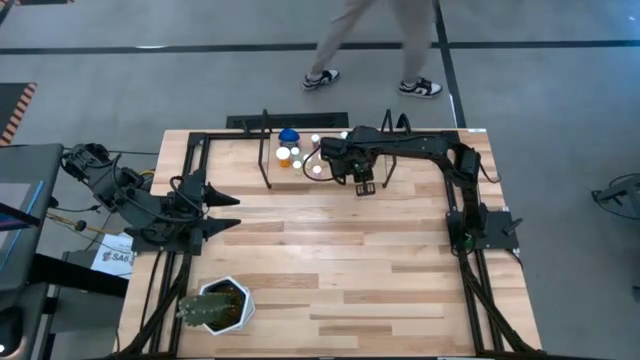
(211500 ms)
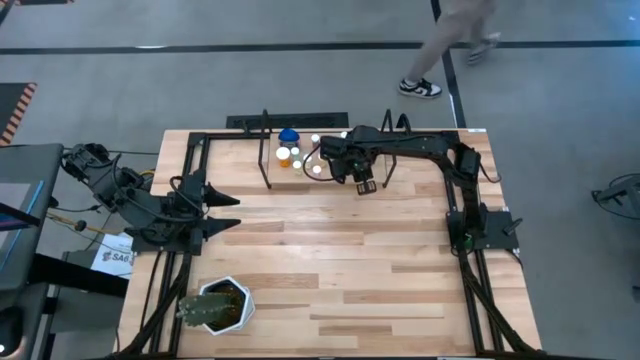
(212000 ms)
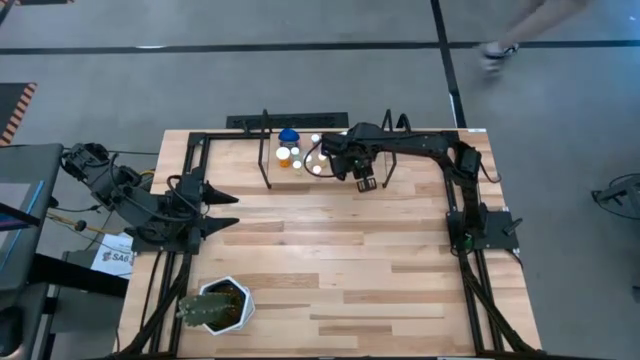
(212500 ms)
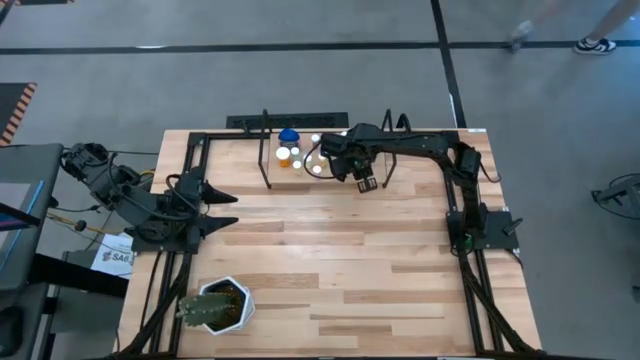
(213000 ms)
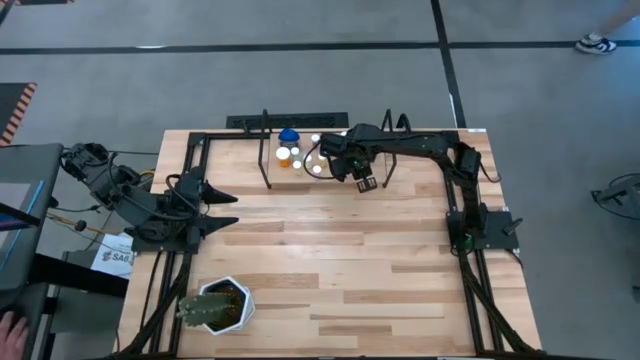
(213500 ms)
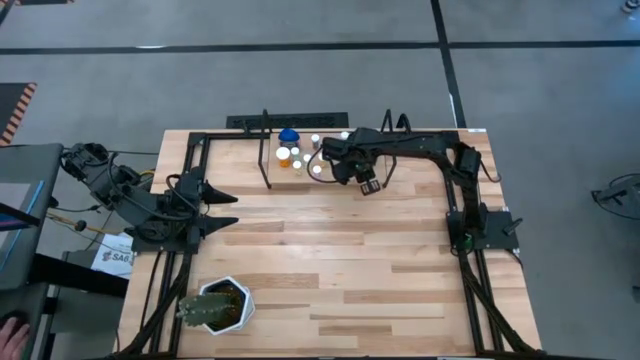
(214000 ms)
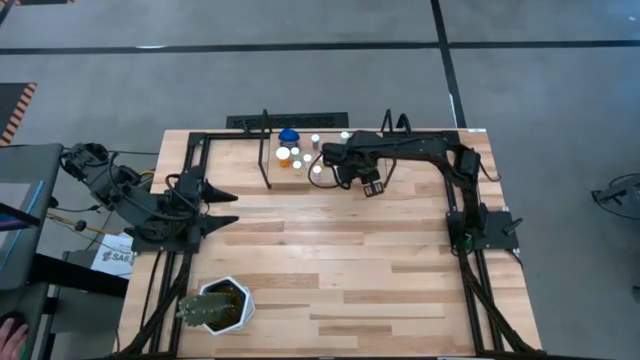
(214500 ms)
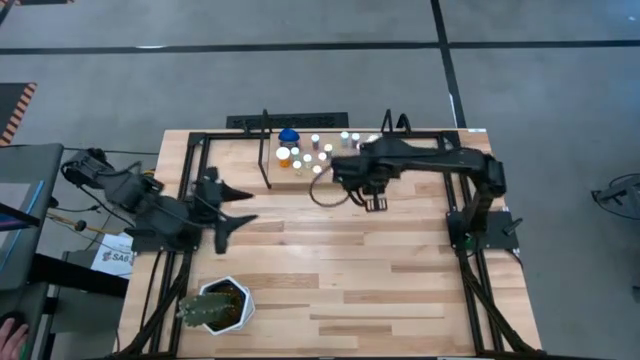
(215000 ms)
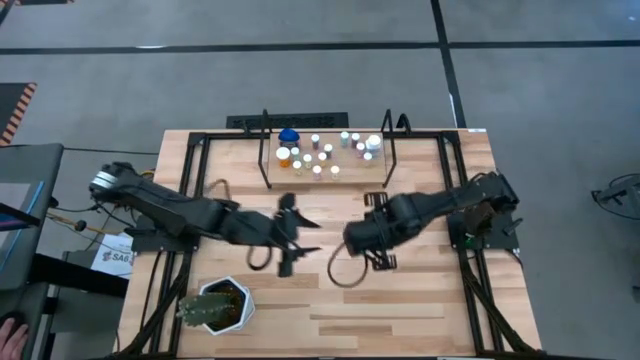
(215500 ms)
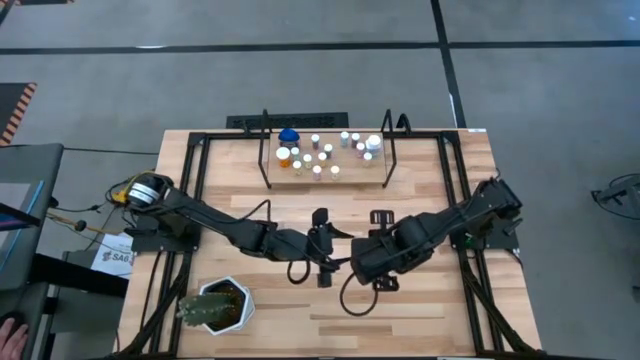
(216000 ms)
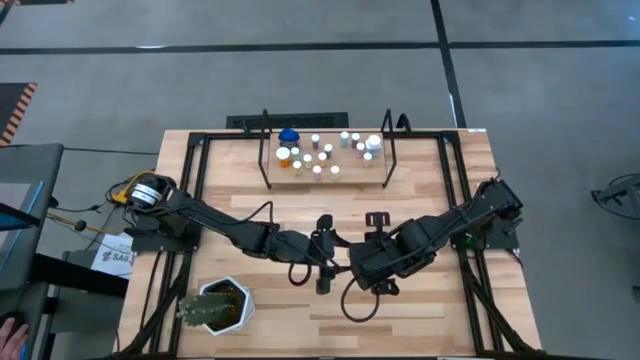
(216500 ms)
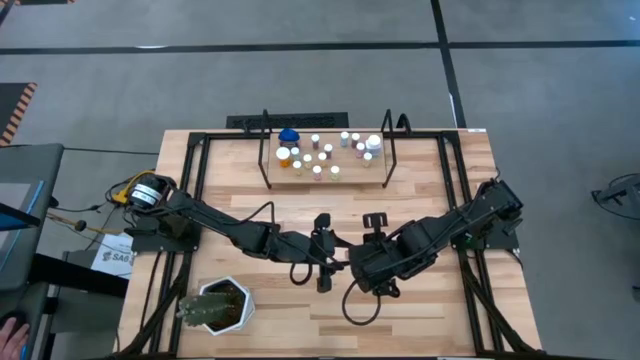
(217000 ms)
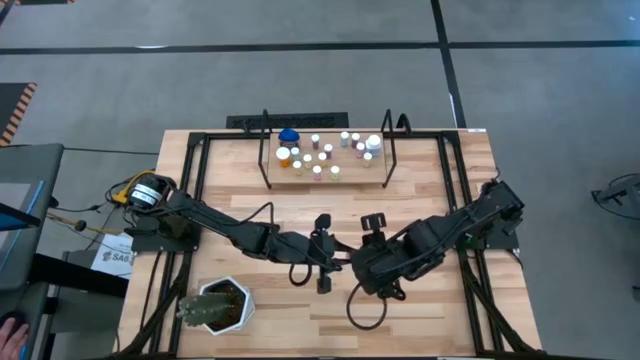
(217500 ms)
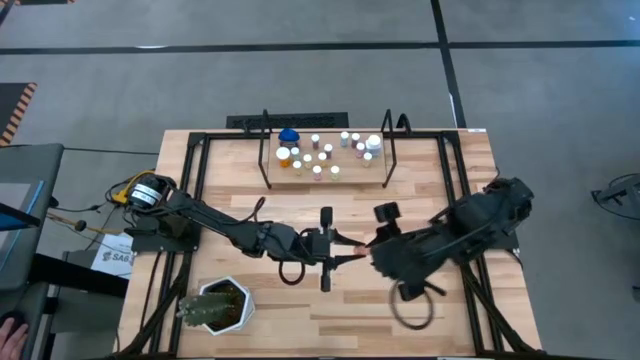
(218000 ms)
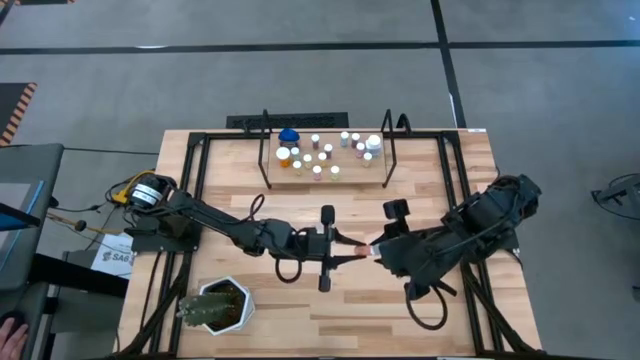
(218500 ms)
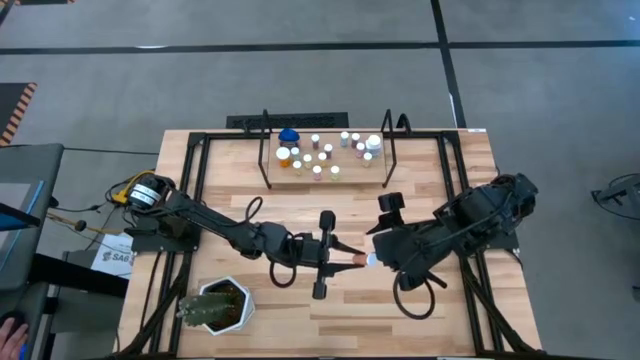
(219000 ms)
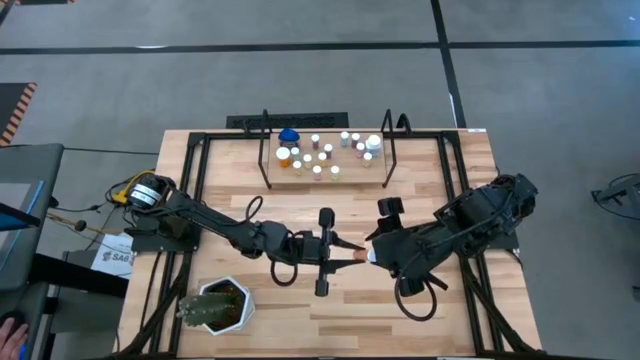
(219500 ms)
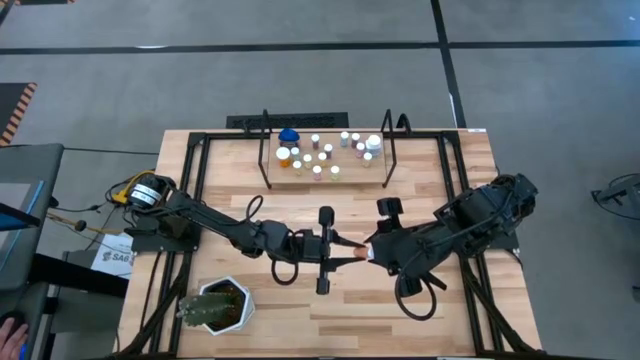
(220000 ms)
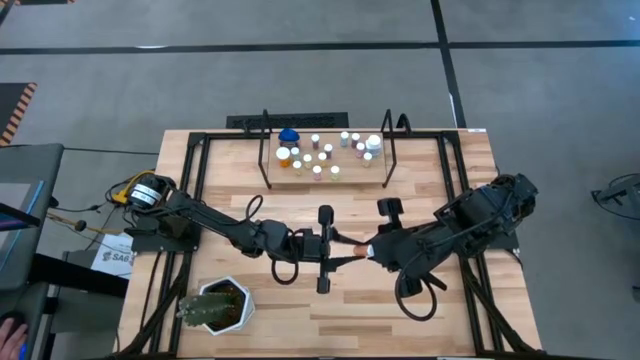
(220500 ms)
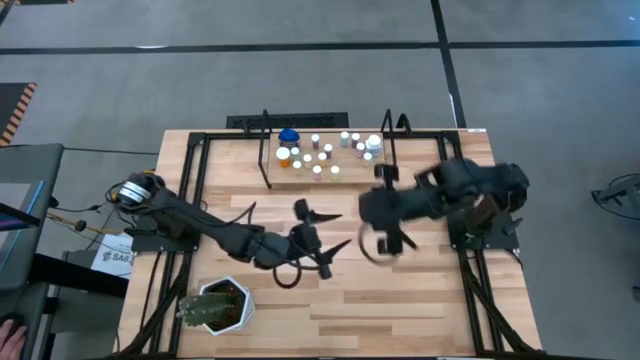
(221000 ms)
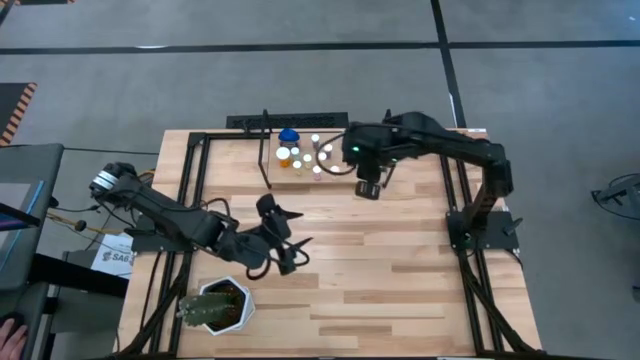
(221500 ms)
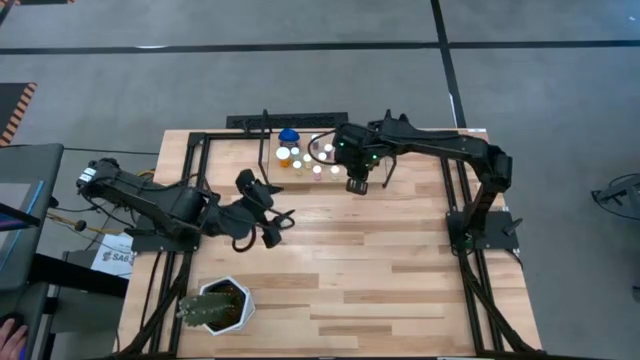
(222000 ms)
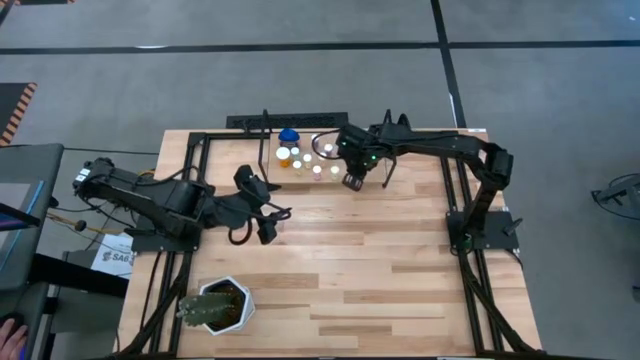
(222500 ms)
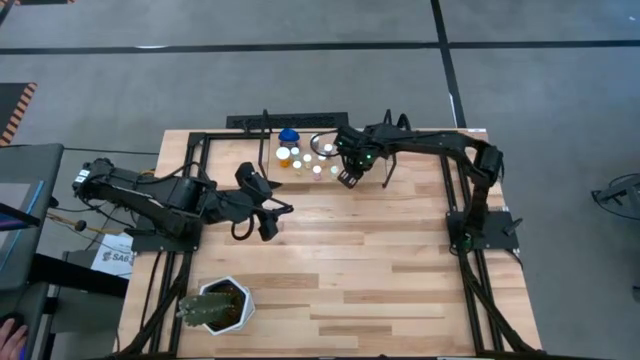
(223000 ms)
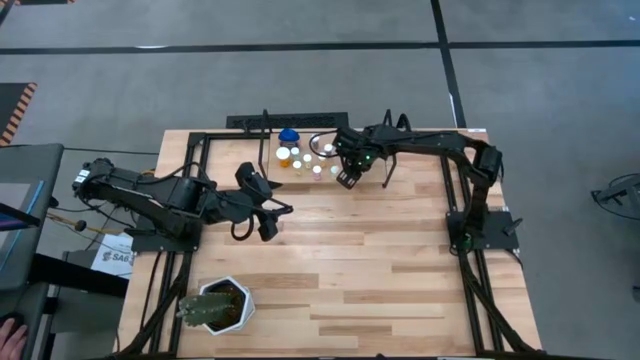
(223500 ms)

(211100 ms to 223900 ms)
Task: Pick and place medicine bottles onto shelf by color
Put the orange pill bottle on the shelf

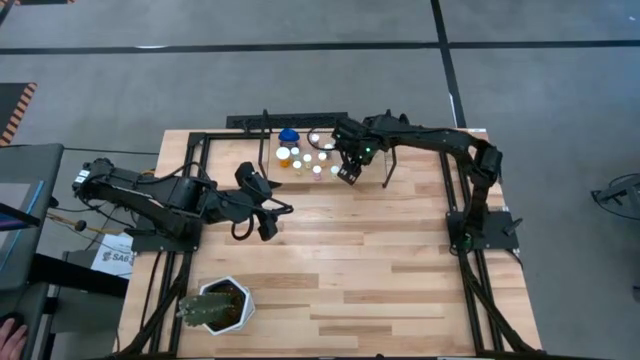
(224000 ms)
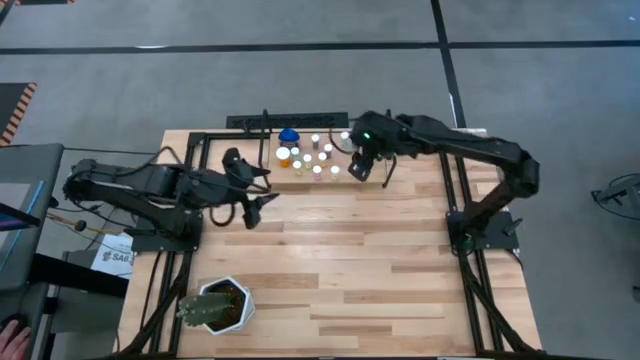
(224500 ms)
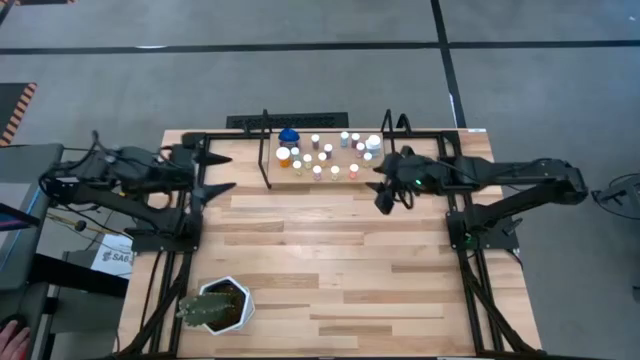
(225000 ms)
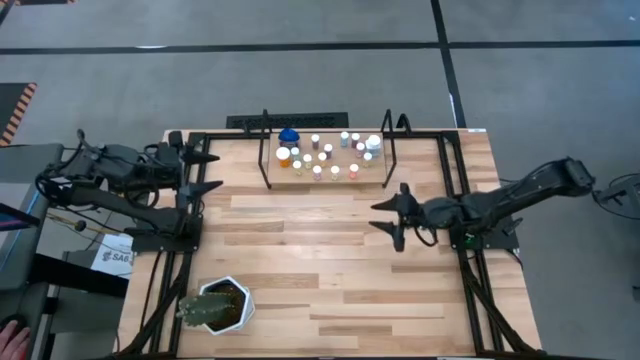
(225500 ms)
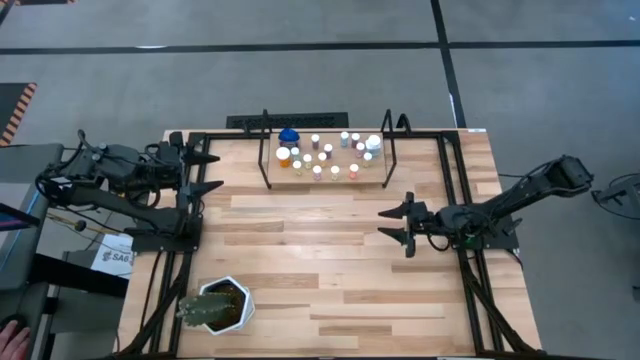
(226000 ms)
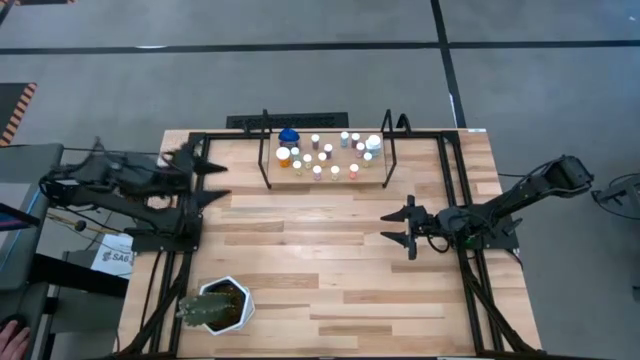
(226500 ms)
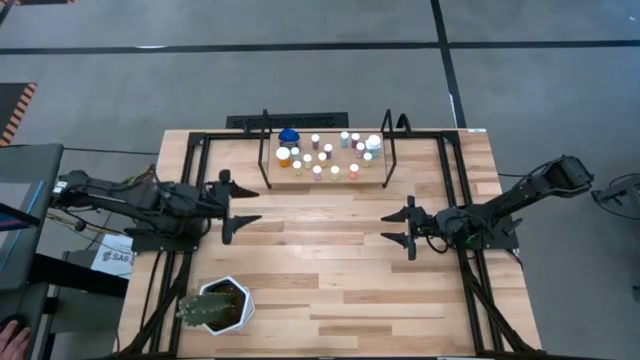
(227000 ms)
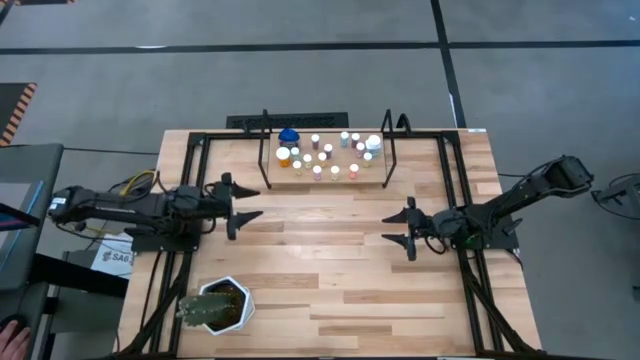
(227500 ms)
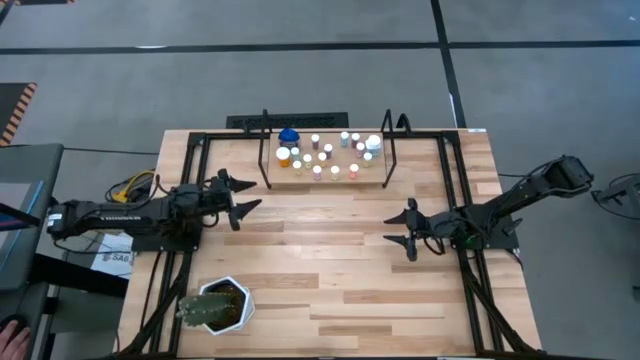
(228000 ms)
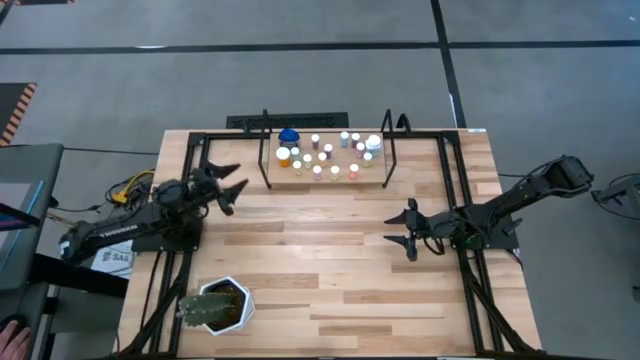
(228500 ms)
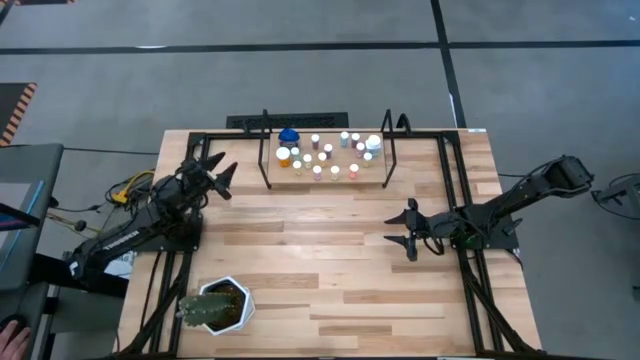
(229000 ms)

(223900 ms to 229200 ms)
Return to Home Position

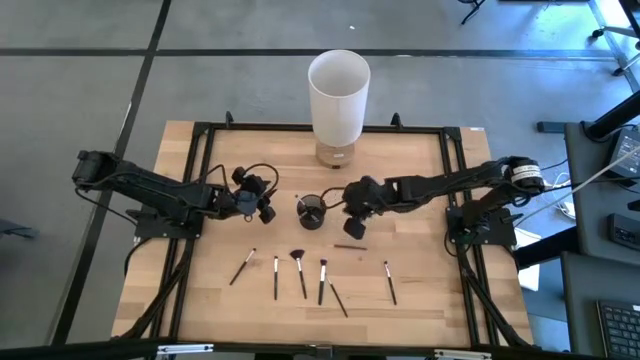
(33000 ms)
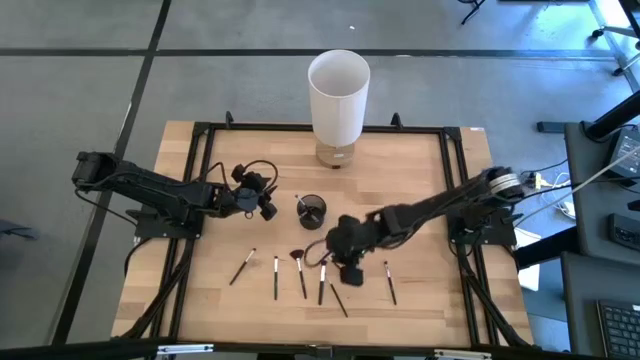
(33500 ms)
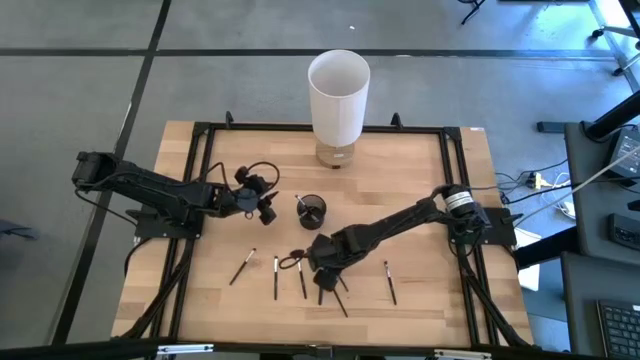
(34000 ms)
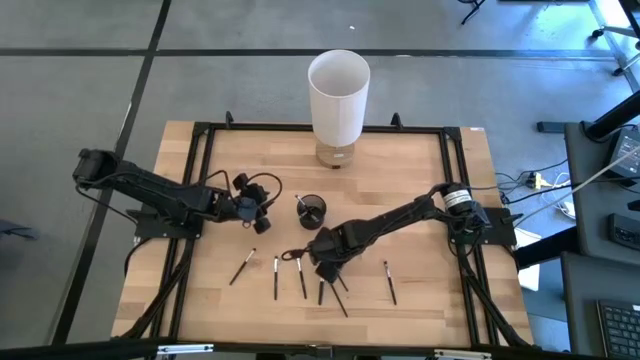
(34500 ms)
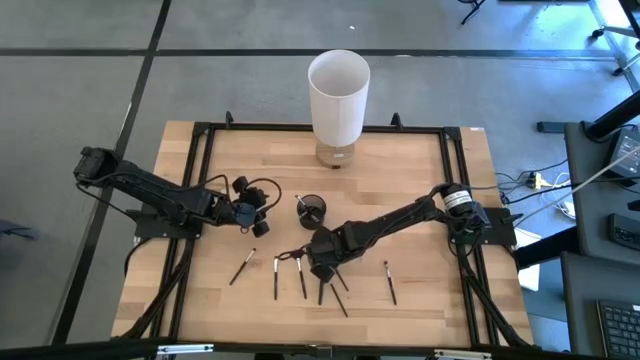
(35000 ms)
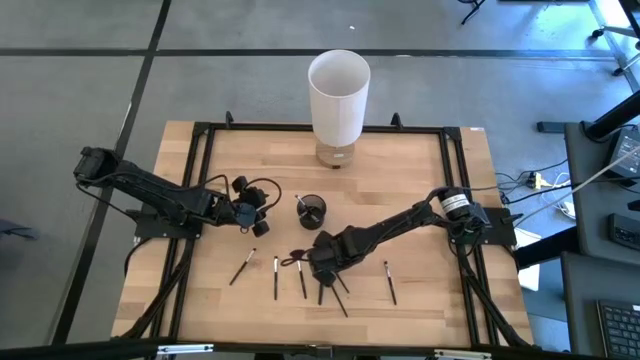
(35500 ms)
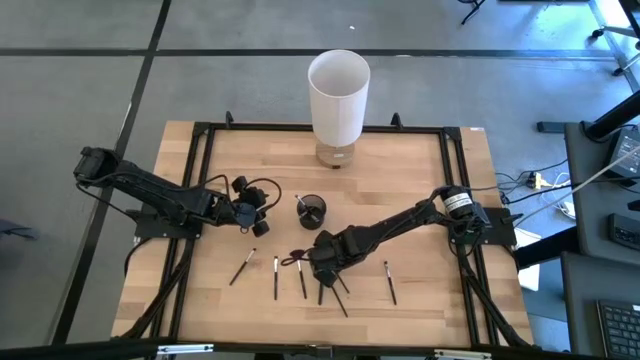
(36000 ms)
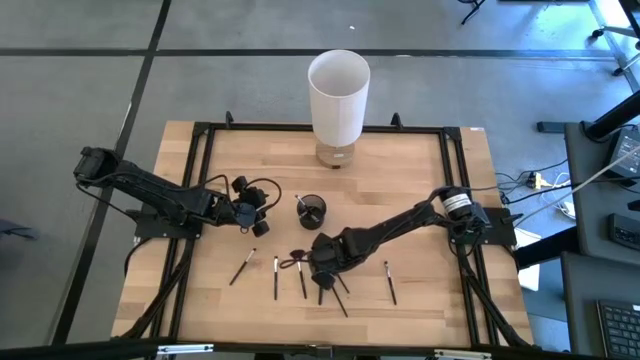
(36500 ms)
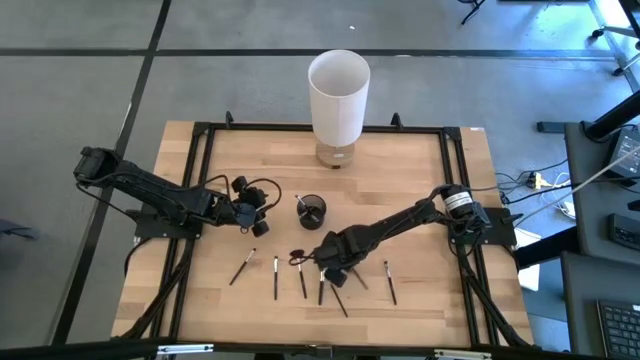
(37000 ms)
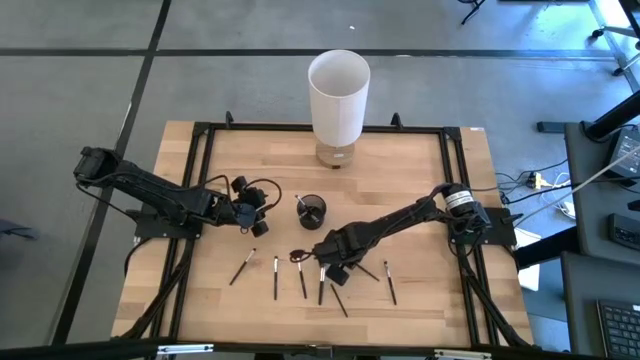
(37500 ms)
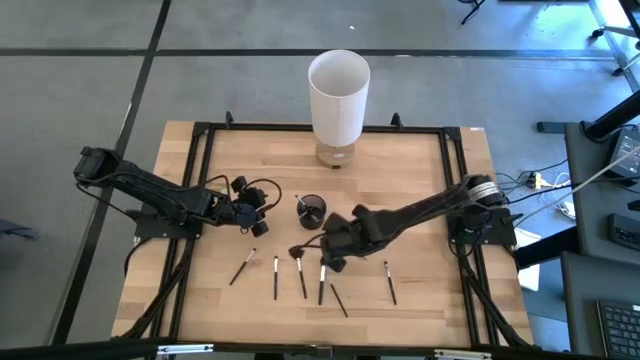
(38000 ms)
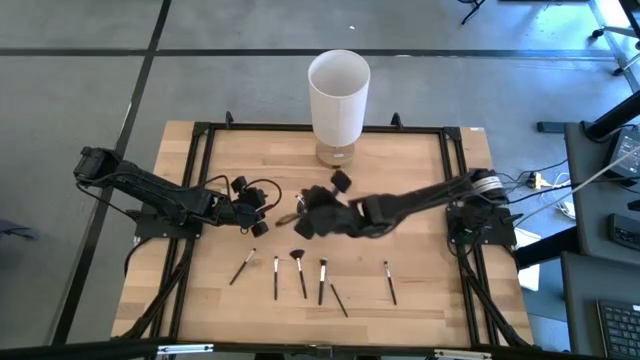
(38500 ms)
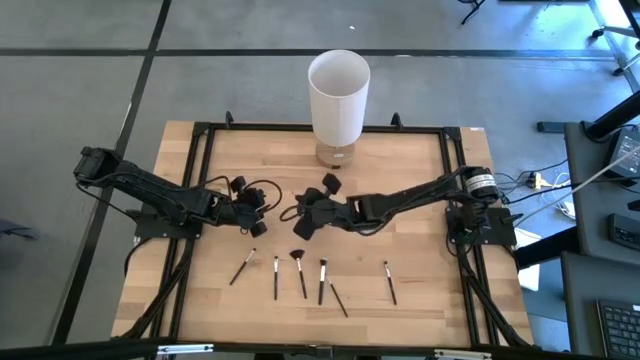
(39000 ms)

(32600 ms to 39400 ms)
Task: Put items in baskets/containers
Put the black eyeshadow brush into the black pen holder
